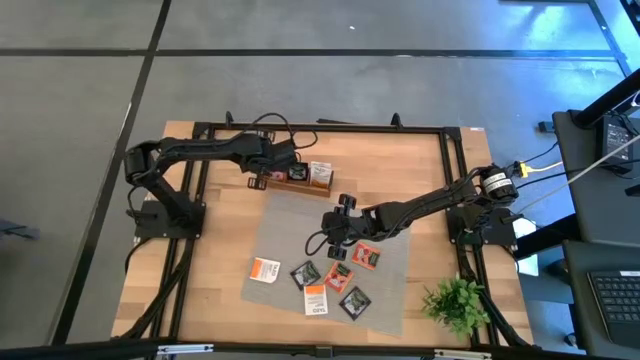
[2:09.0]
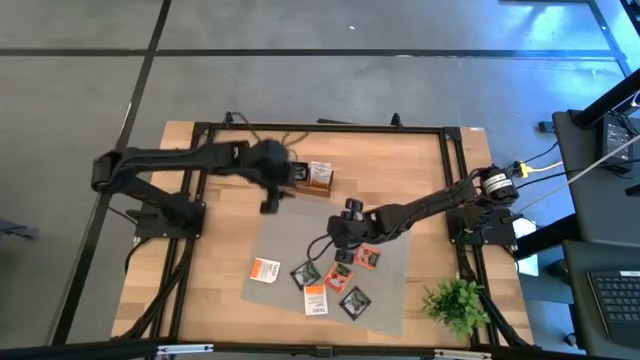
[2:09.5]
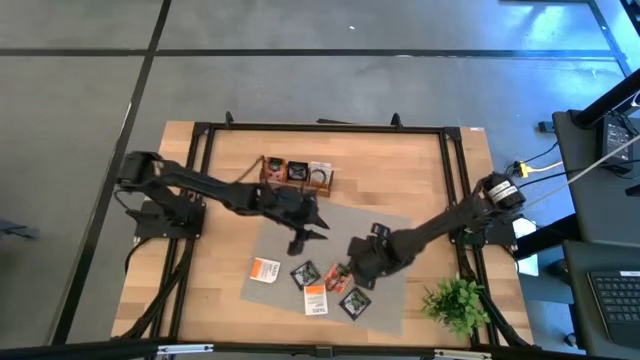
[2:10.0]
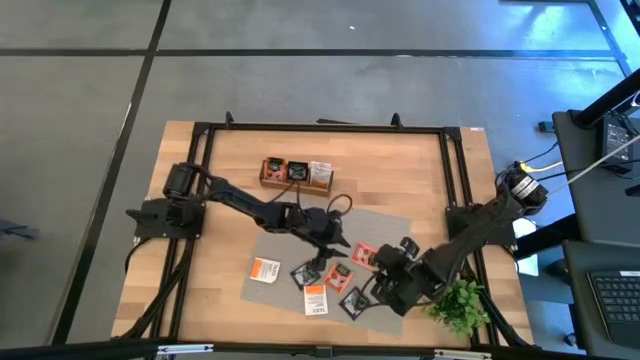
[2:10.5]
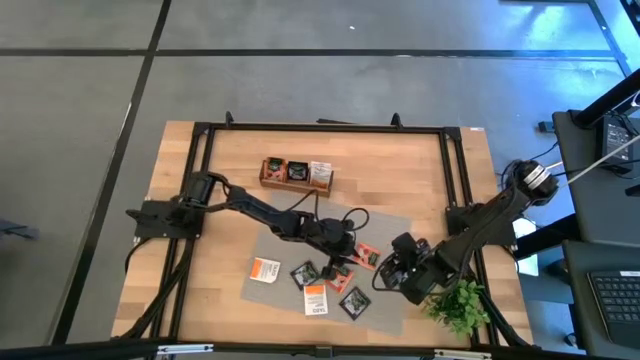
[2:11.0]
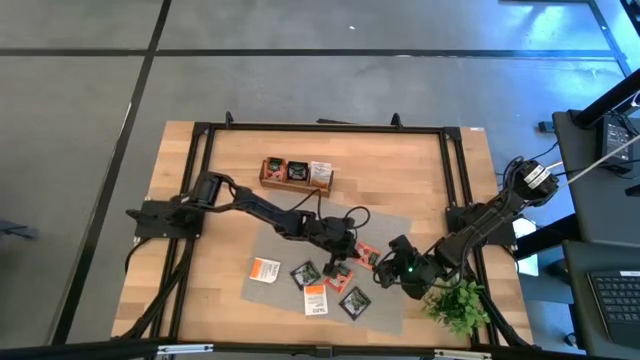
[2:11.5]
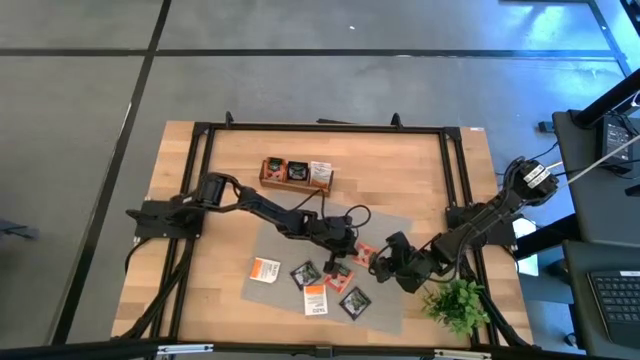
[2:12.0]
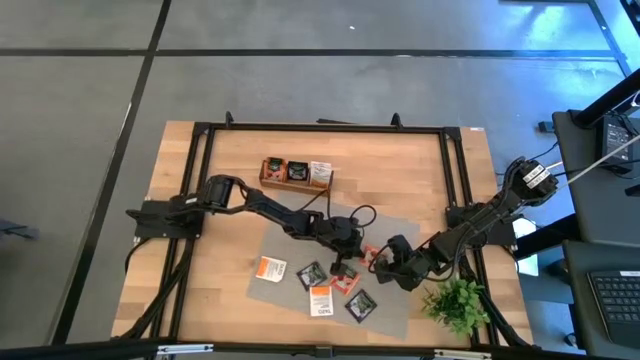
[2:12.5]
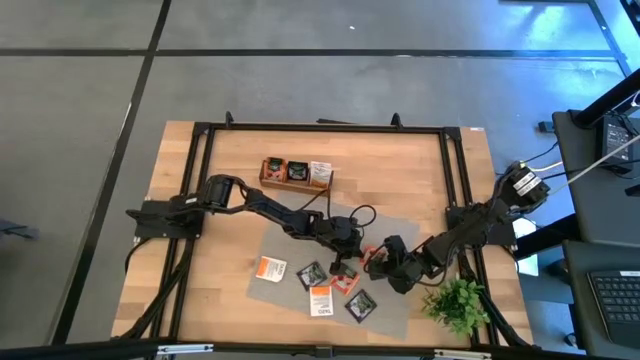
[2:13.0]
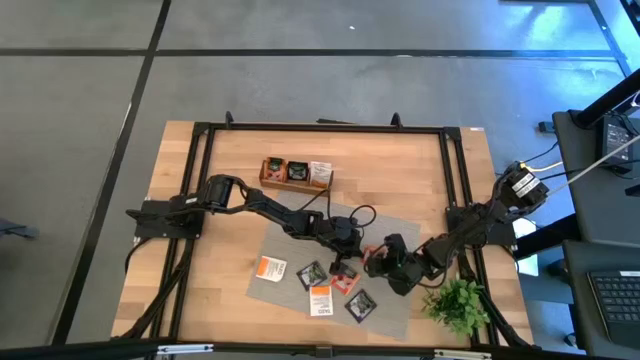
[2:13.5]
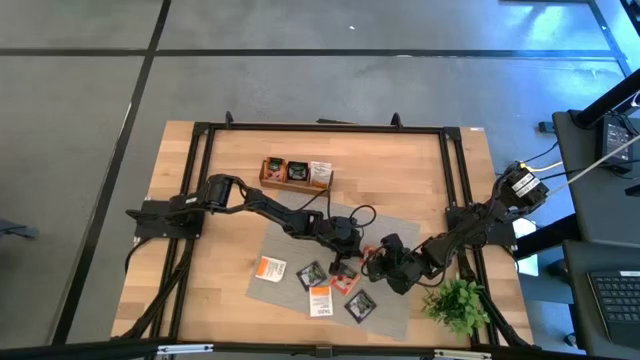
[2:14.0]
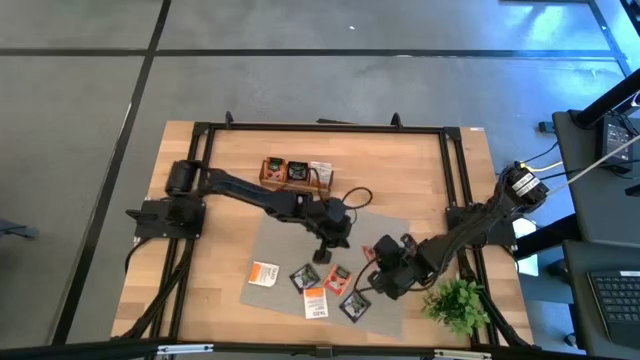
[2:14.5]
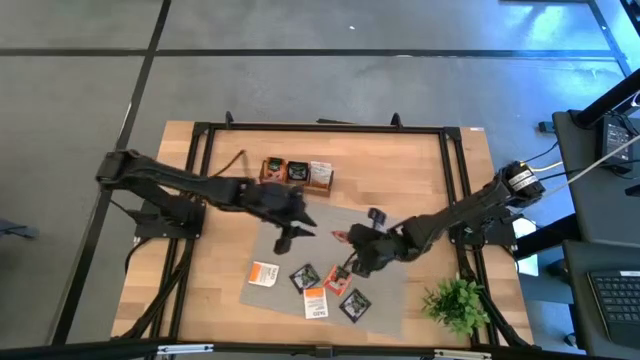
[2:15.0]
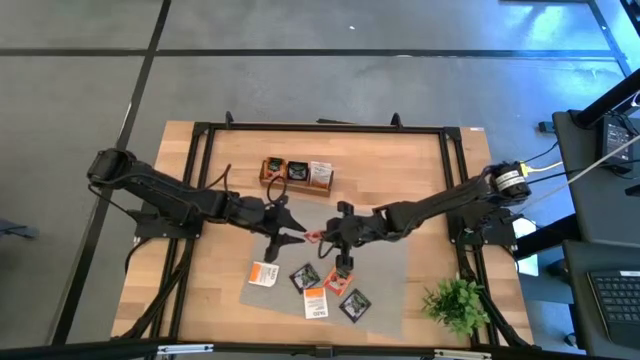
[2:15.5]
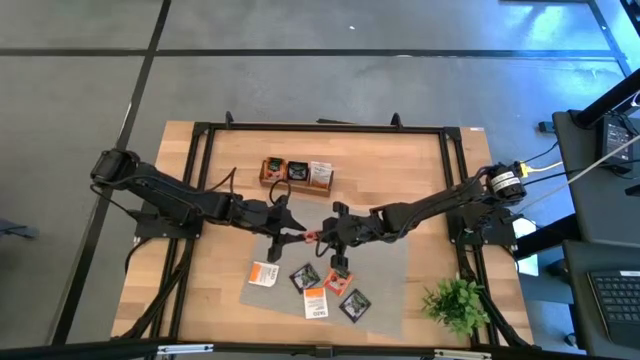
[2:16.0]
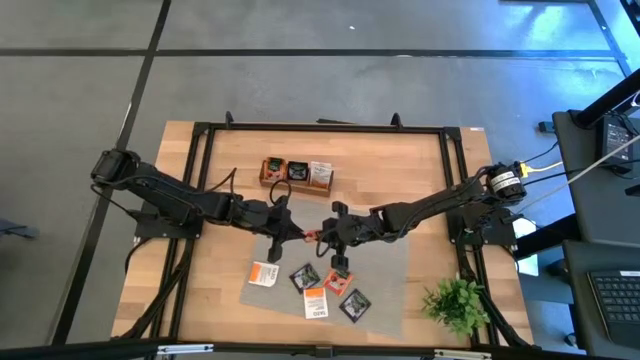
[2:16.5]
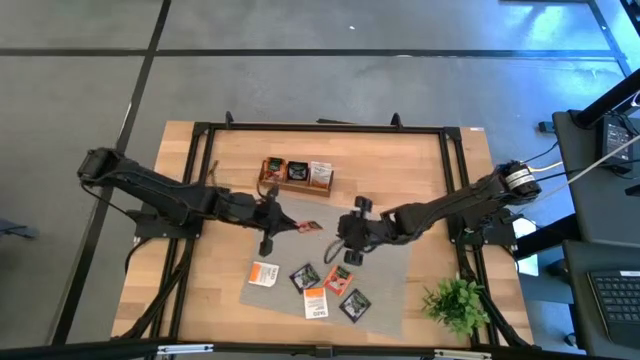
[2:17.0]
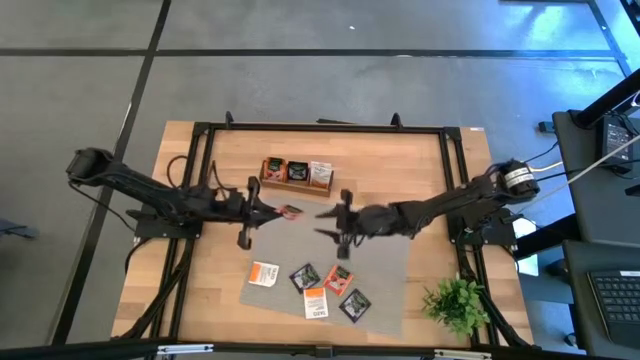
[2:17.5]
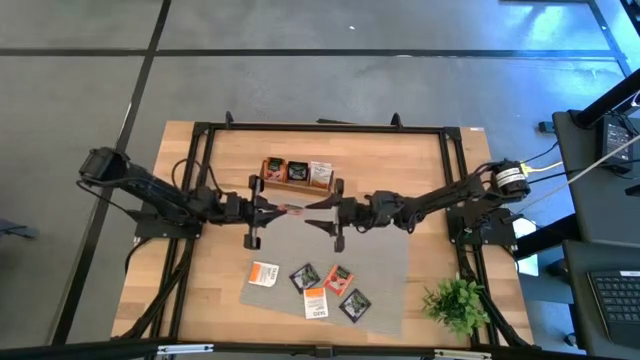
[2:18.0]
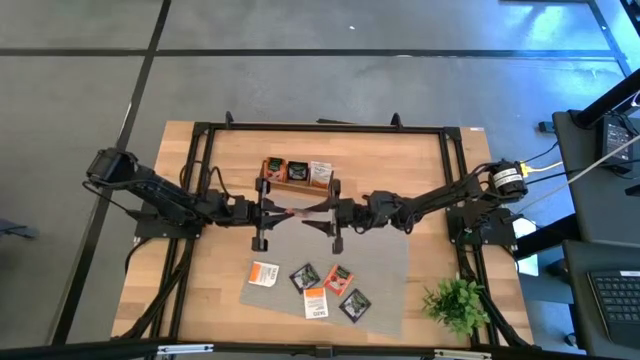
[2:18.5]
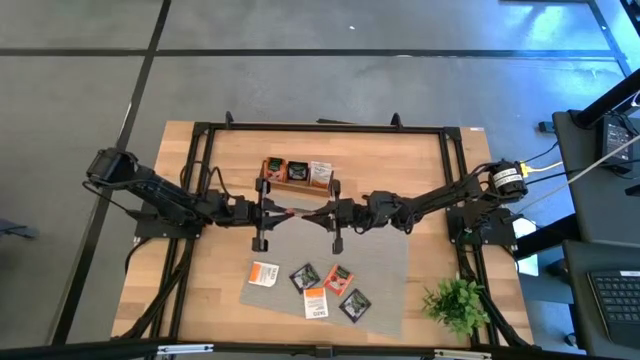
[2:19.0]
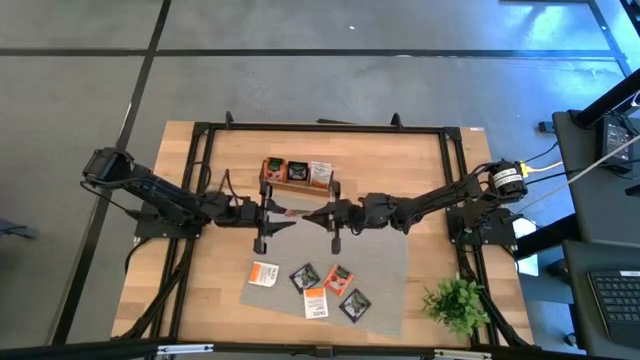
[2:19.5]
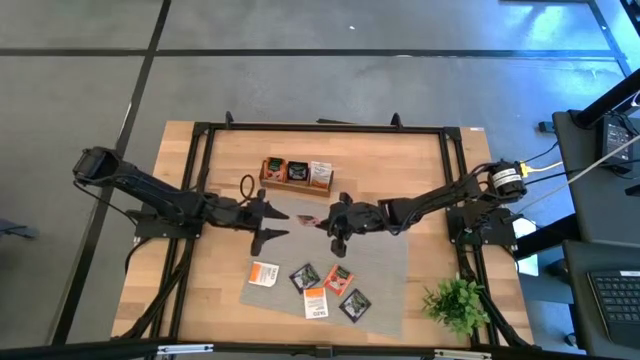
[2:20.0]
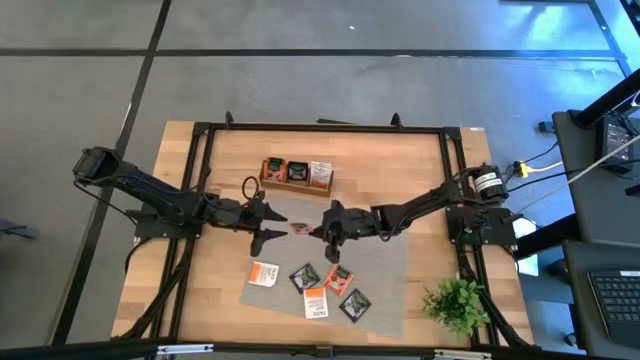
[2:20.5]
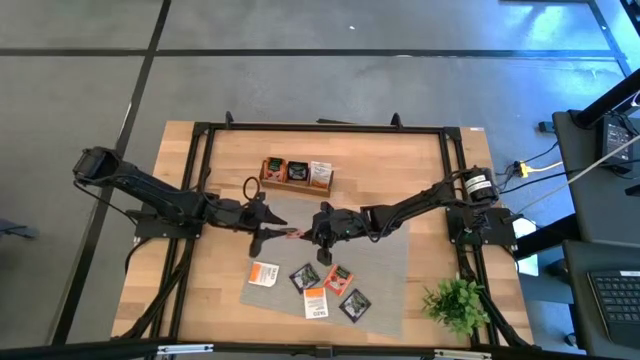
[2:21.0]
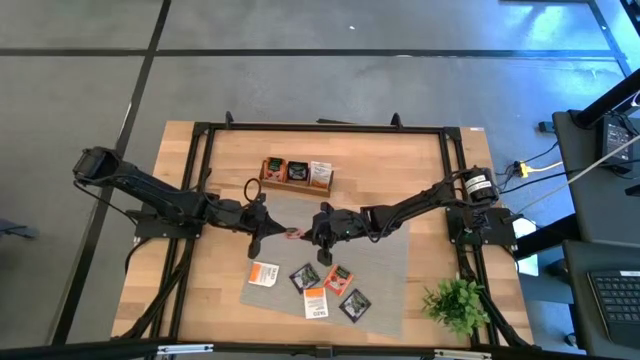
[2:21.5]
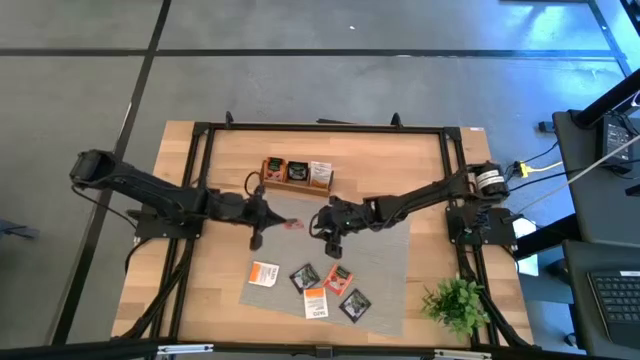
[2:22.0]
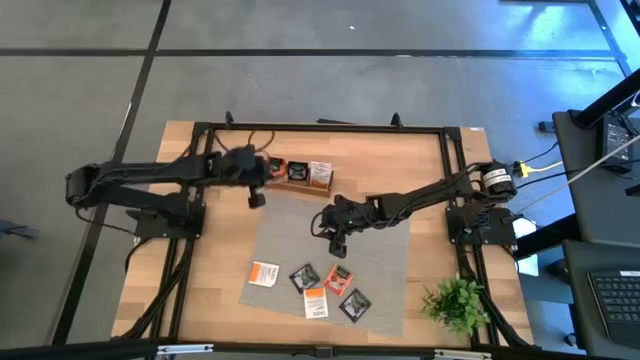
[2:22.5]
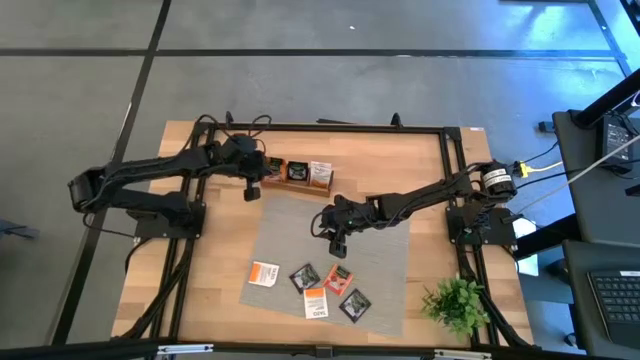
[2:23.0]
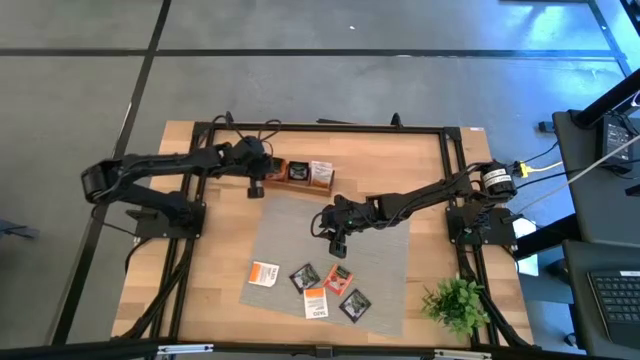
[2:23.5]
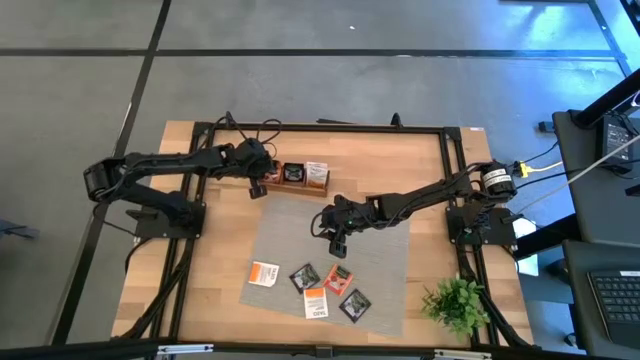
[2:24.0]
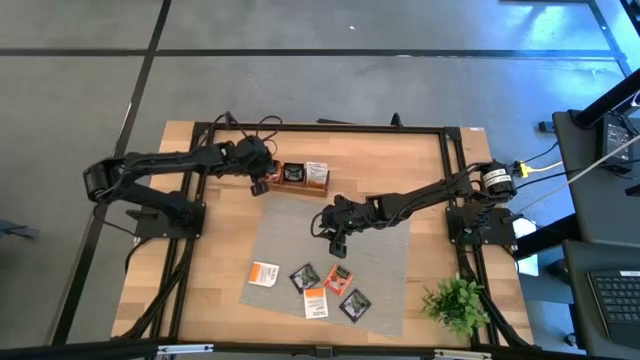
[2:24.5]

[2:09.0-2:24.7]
Task: Pick & Place Tea
Put the orange tea bag into the left section of the wooden organizer

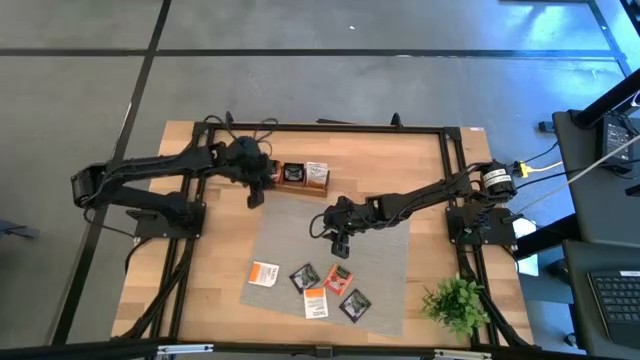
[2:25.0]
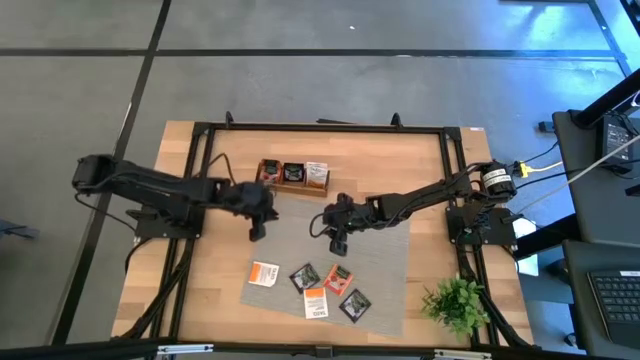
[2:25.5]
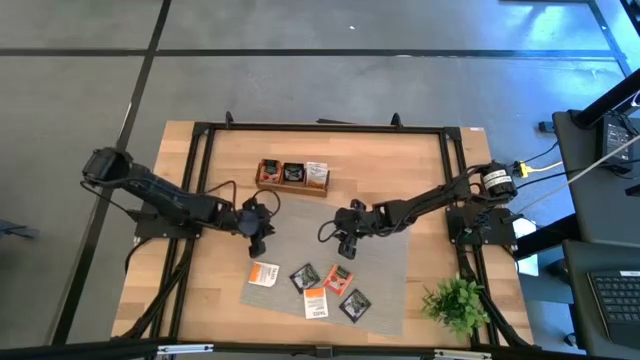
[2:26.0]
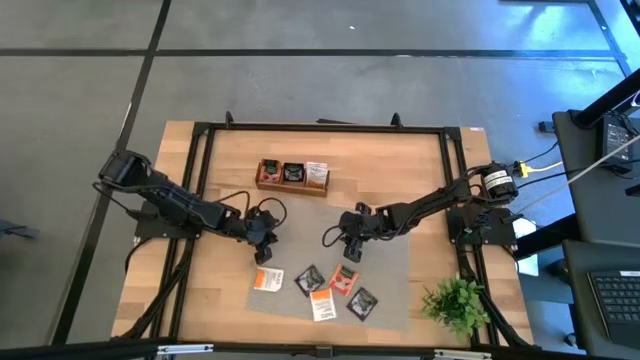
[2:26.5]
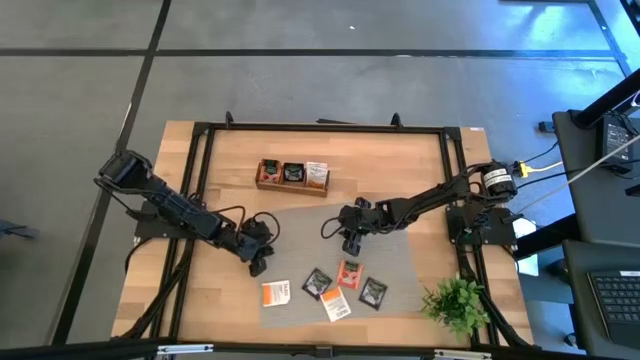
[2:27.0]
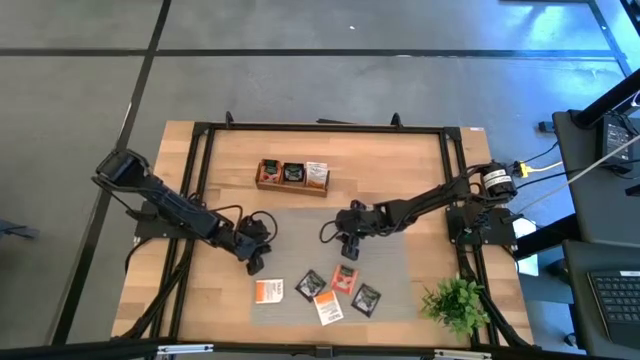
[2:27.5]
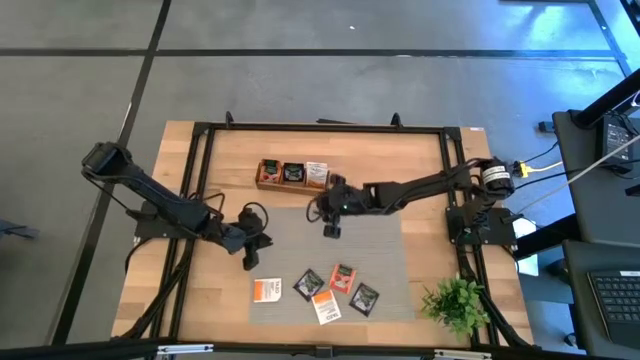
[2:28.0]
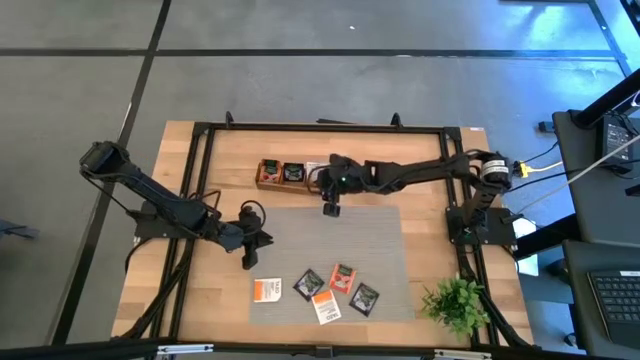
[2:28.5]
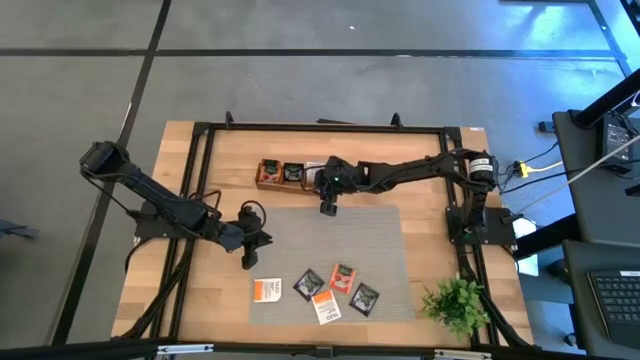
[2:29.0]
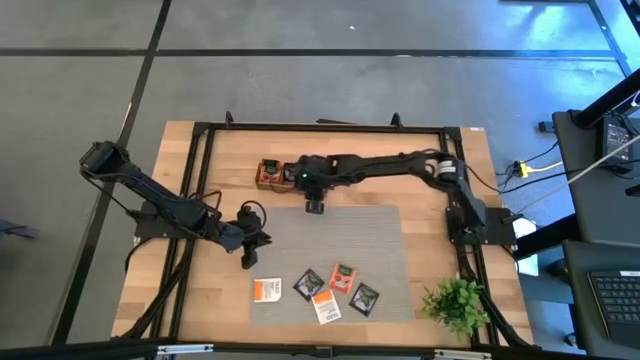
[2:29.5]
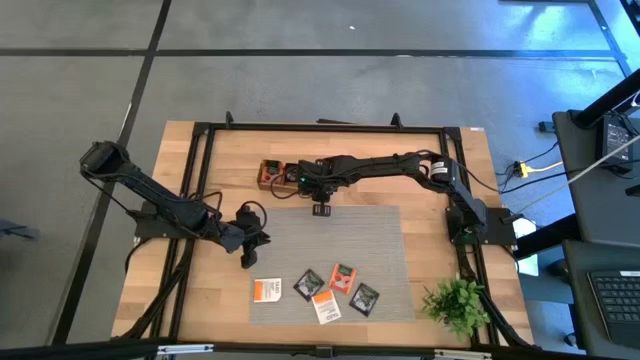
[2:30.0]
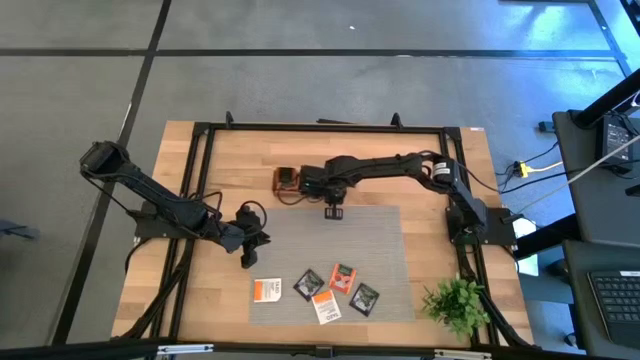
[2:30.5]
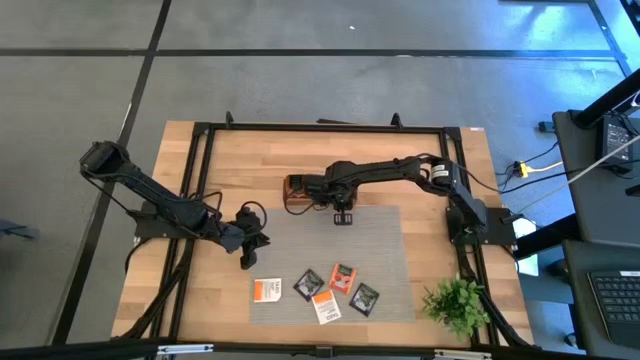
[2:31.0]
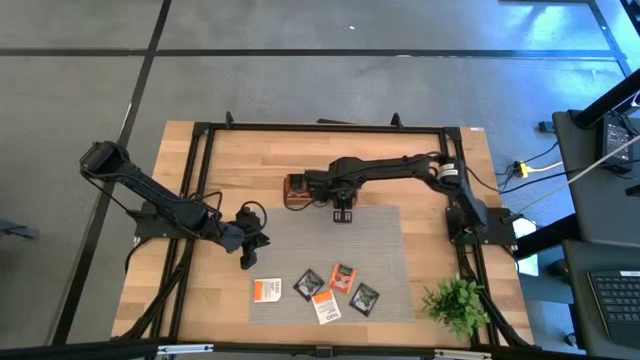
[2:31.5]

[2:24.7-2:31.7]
Adjust the wooden organizer
